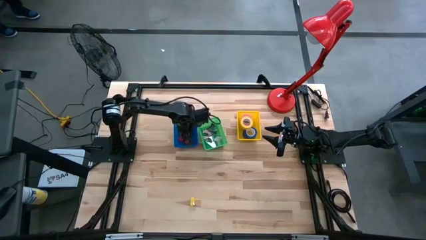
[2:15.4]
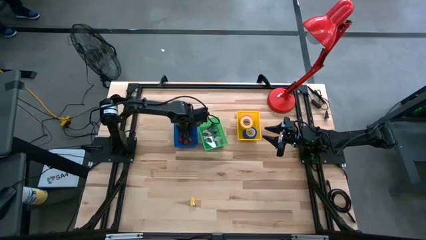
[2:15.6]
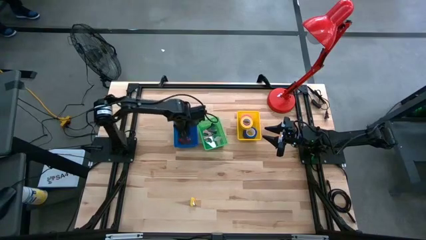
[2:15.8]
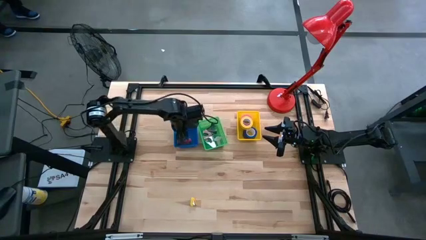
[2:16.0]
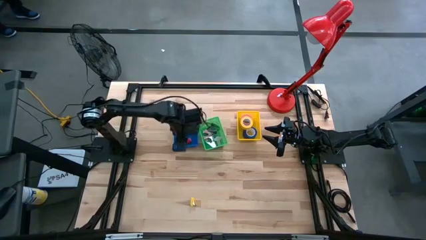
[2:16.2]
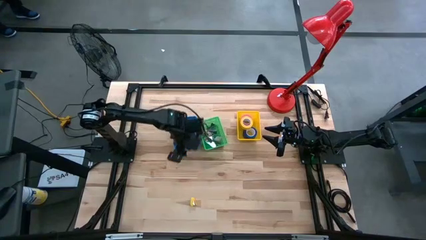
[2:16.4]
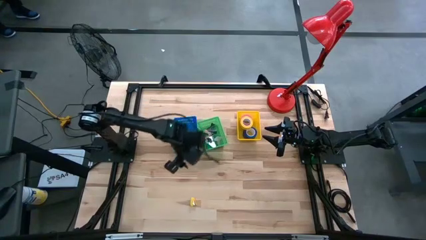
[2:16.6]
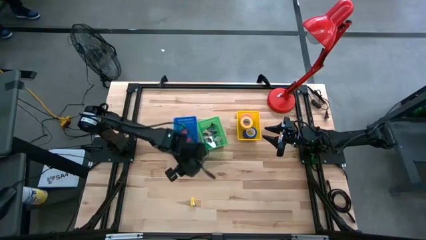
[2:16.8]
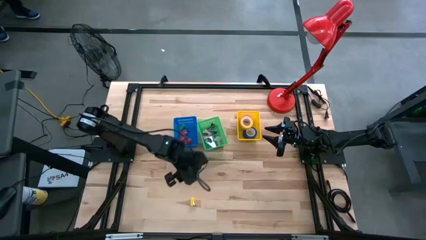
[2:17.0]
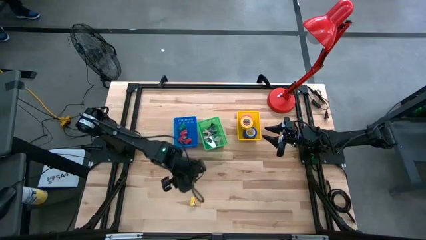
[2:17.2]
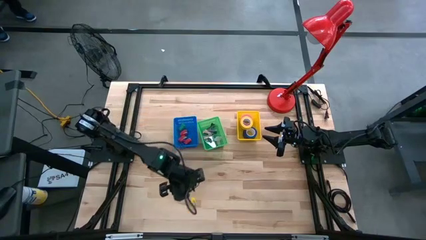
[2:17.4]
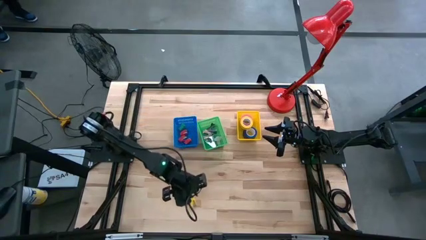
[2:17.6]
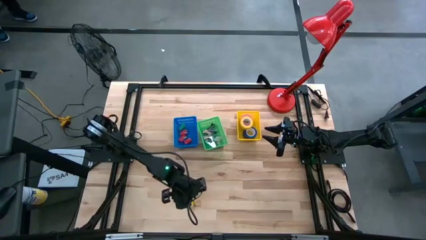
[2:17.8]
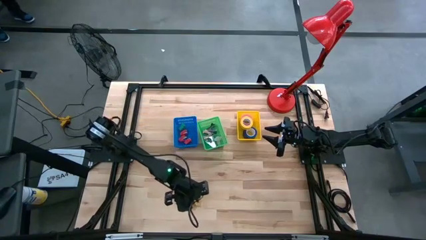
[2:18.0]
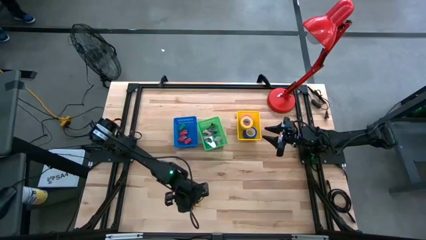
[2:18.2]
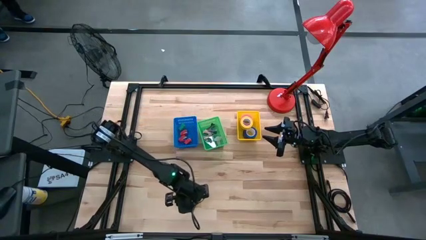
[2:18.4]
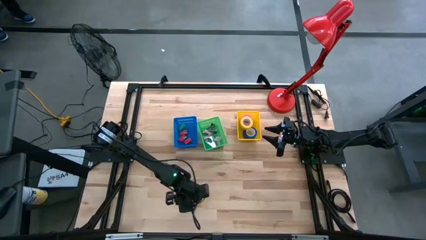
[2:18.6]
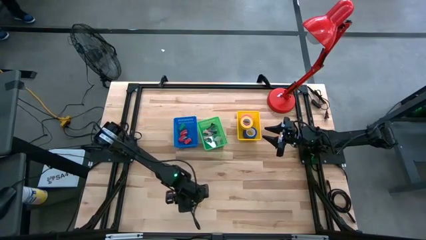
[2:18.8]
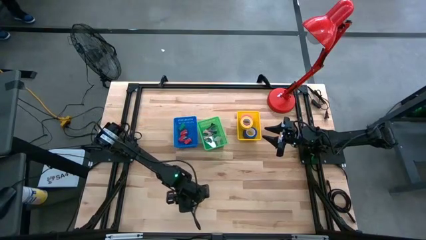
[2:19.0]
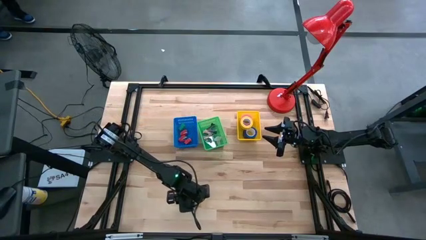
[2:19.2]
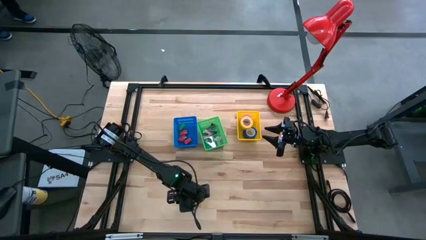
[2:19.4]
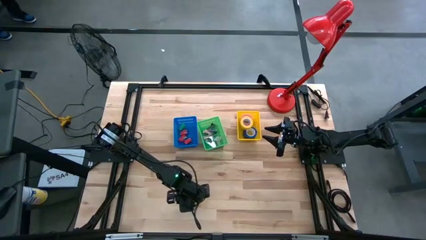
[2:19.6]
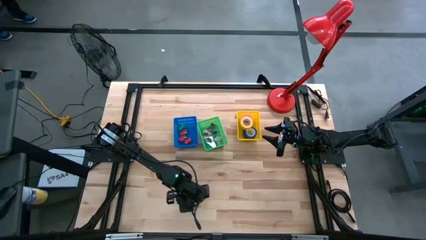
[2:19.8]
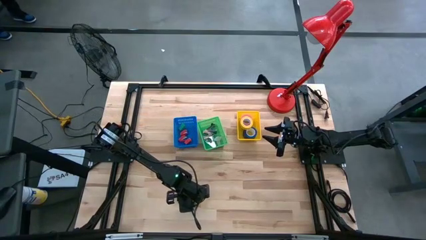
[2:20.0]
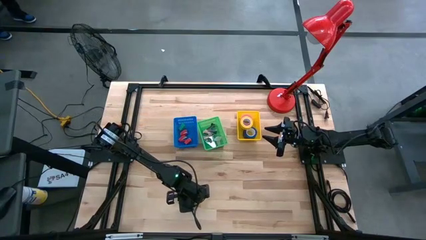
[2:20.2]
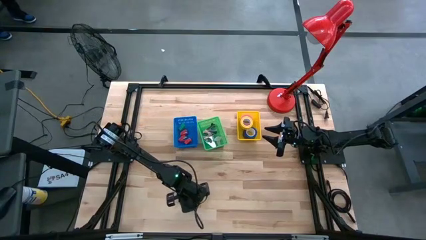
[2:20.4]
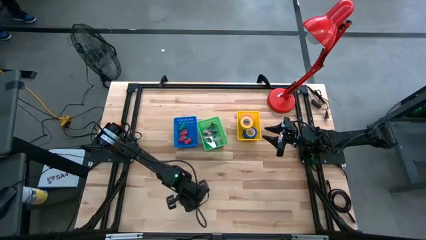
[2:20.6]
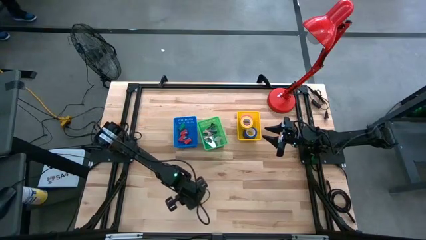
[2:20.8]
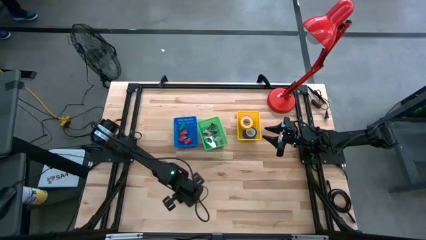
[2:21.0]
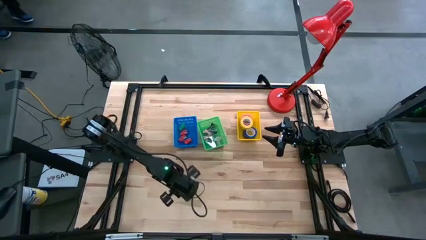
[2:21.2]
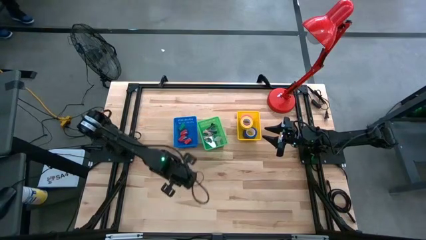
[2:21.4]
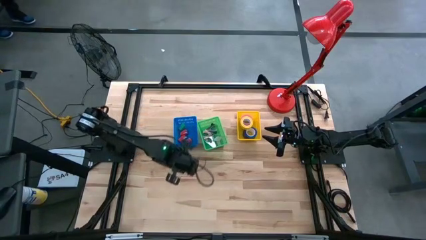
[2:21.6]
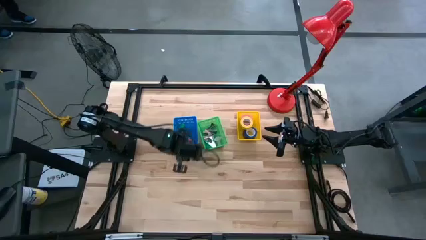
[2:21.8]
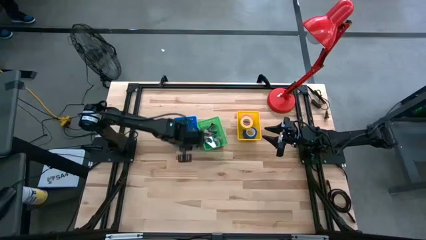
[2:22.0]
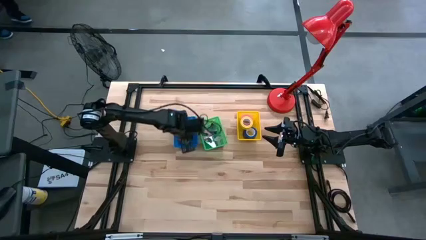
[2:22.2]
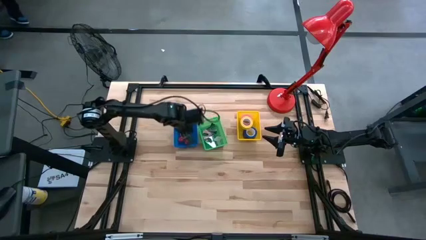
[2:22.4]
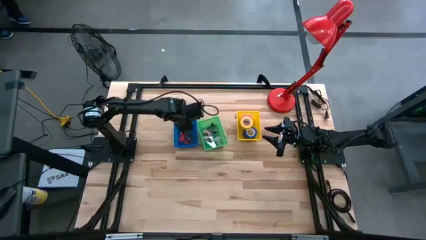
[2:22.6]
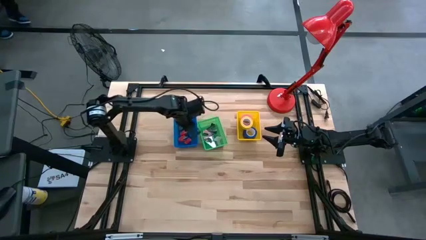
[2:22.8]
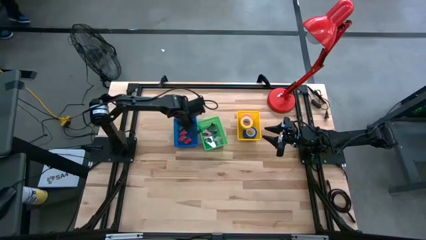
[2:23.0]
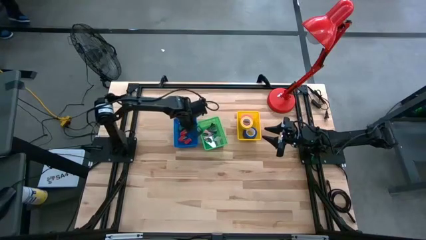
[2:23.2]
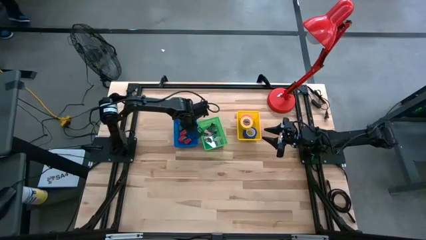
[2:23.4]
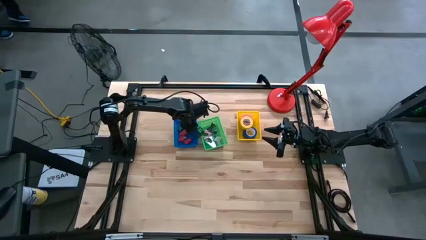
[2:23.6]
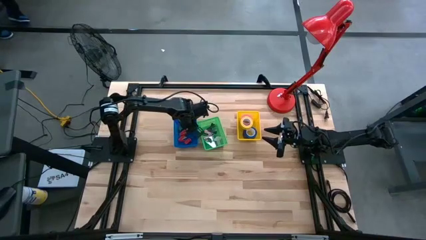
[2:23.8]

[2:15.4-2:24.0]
Task: Pick and place Stapler, Stapler remover, tape
Put the yellow stapler into the blue bin

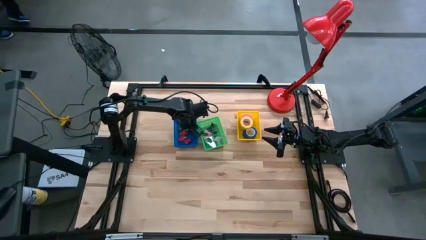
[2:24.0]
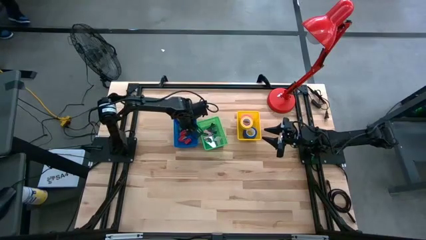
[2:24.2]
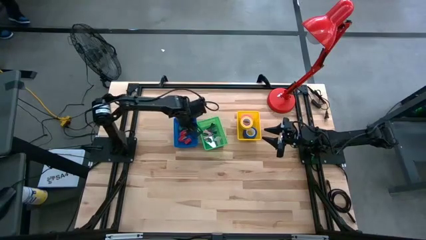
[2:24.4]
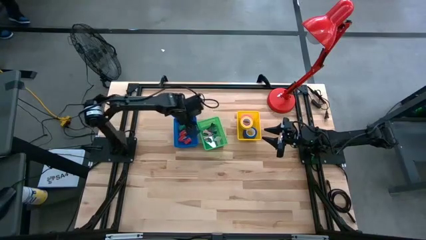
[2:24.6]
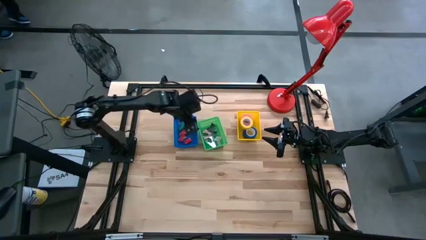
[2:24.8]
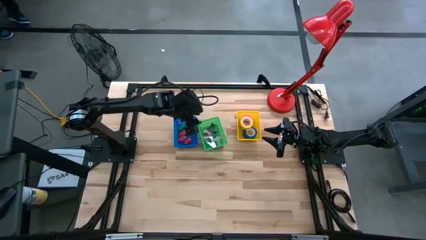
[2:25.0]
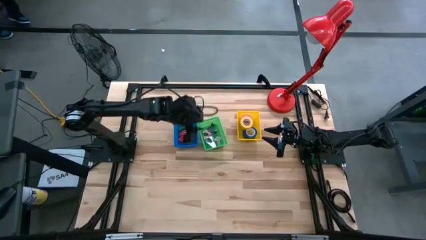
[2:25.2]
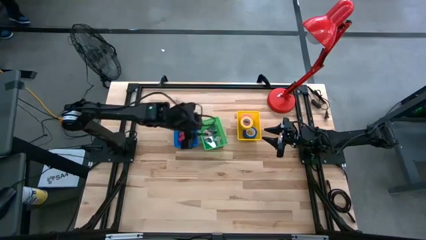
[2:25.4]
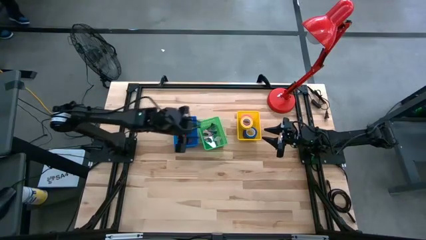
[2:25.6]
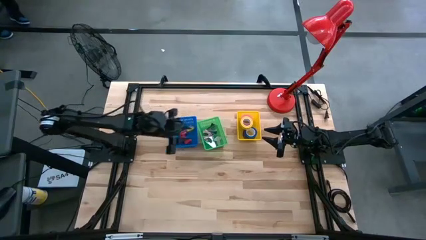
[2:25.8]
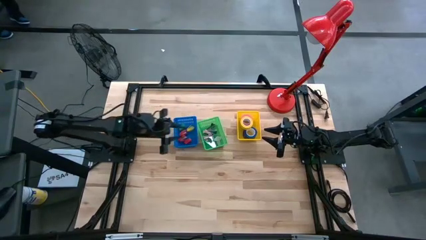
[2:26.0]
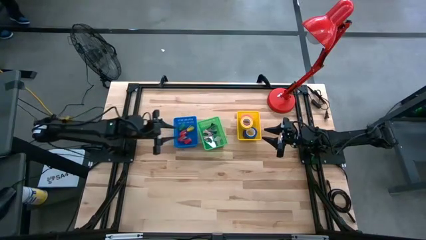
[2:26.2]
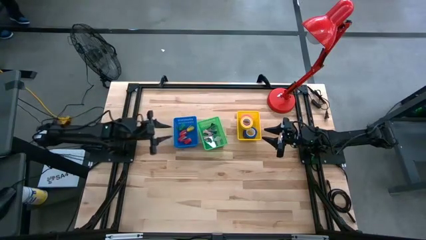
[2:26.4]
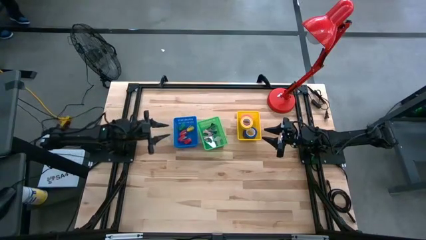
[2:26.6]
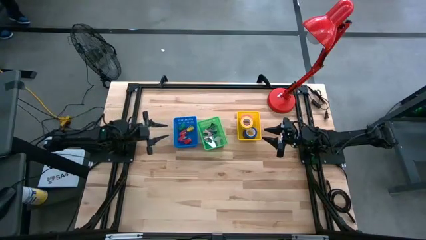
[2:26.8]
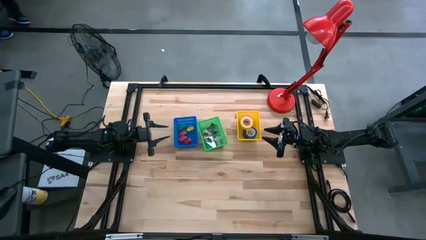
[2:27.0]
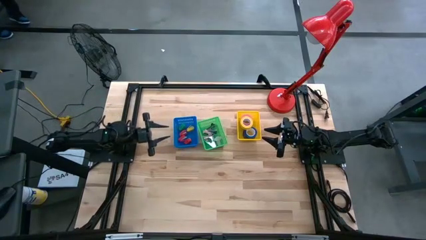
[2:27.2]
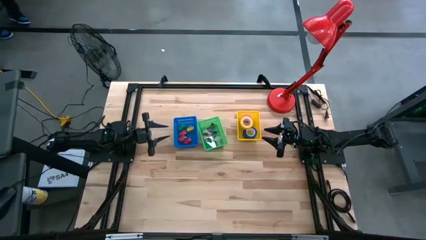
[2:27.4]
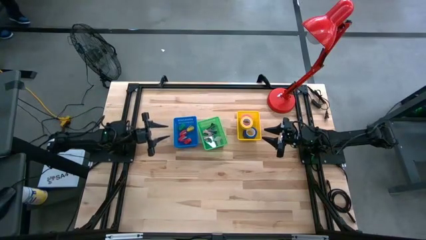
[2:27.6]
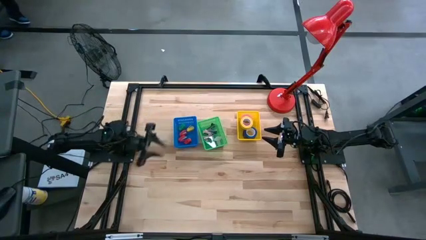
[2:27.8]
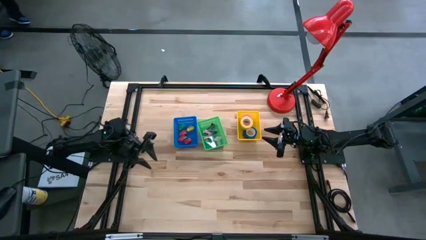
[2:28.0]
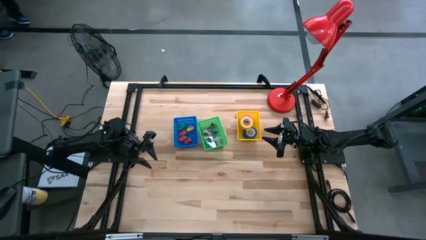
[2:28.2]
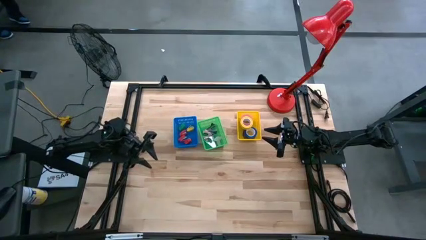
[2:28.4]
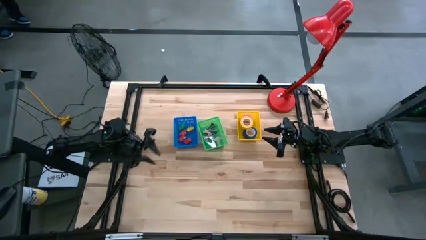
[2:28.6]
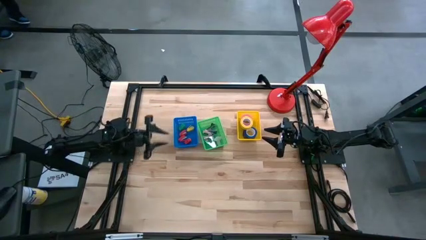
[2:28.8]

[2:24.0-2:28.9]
Return to Home Position
